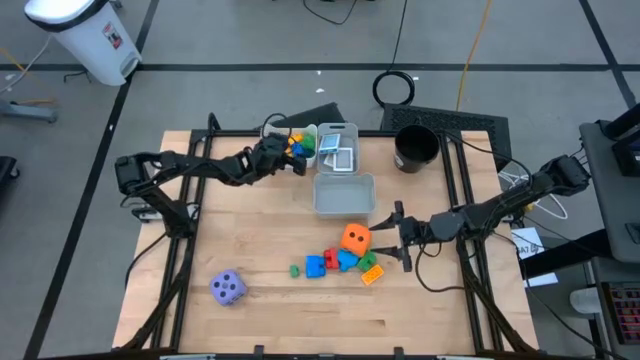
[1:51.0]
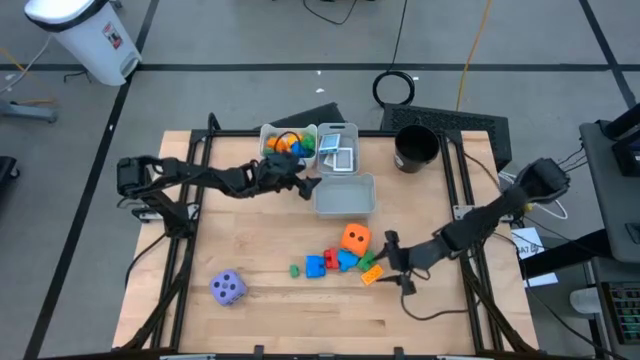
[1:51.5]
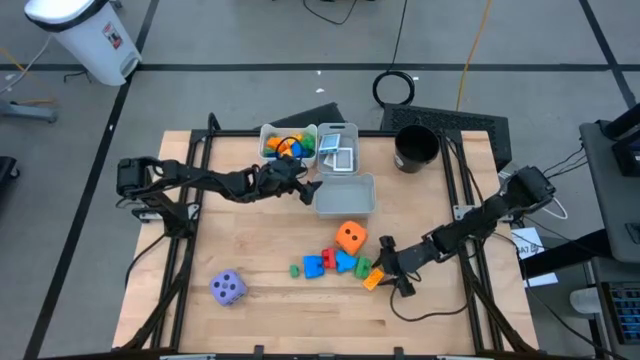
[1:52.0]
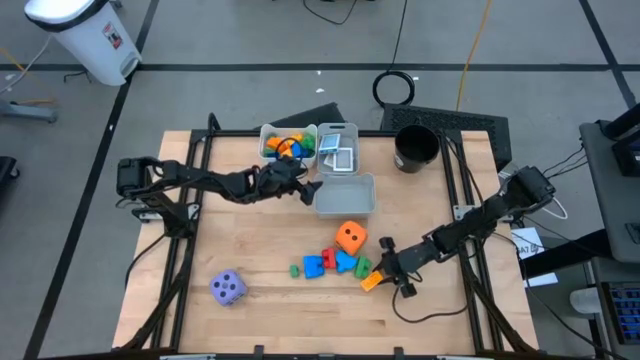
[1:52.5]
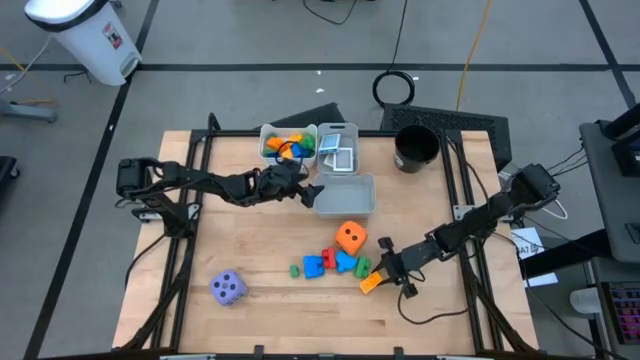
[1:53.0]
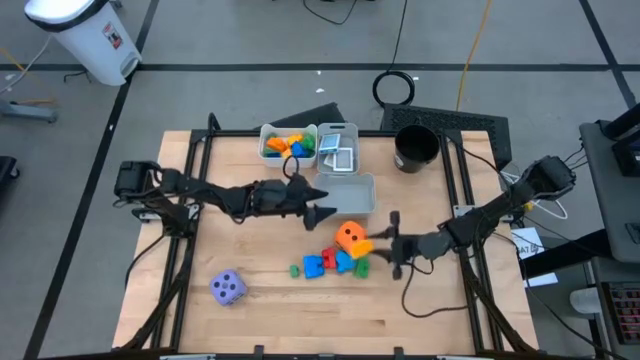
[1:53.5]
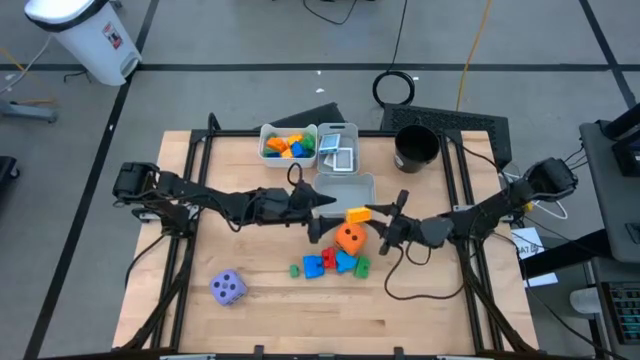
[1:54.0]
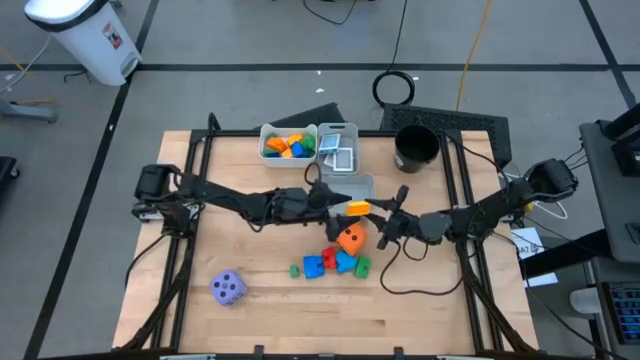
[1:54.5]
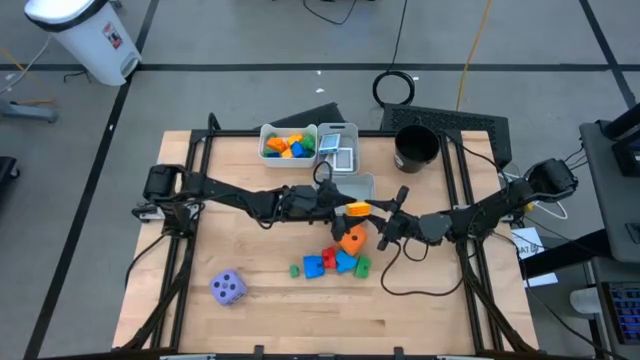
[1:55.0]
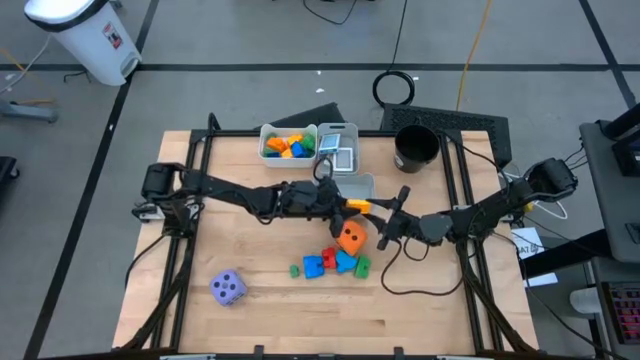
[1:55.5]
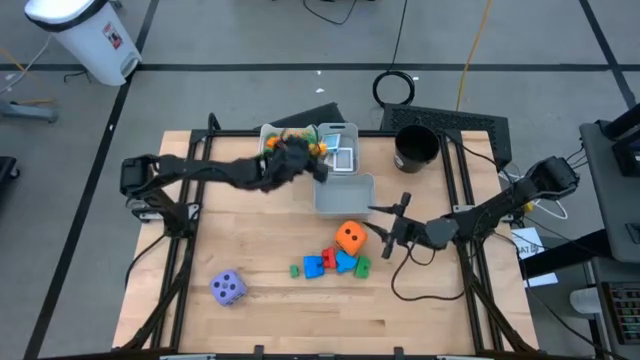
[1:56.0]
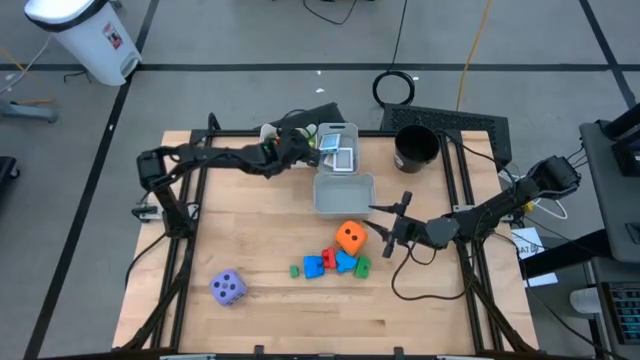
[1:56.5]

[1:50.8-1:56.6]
Task: Pick & Place Toys
Put the yellow game piece into the white bin

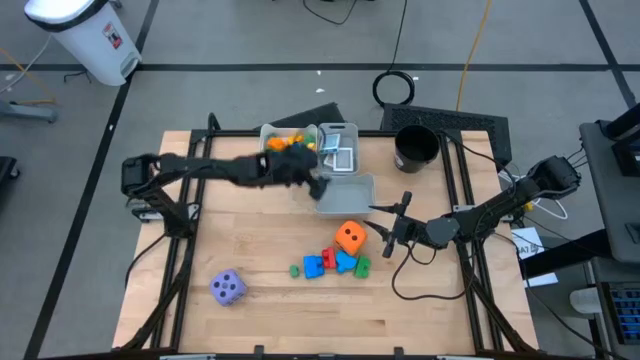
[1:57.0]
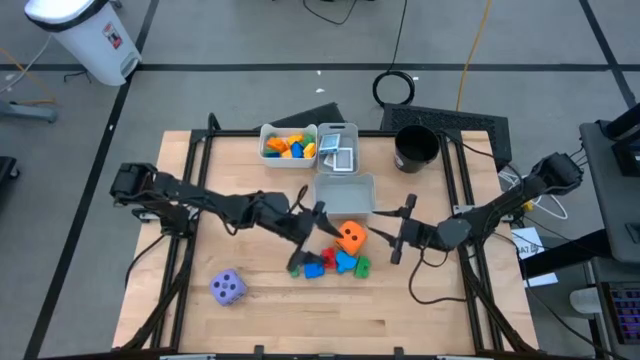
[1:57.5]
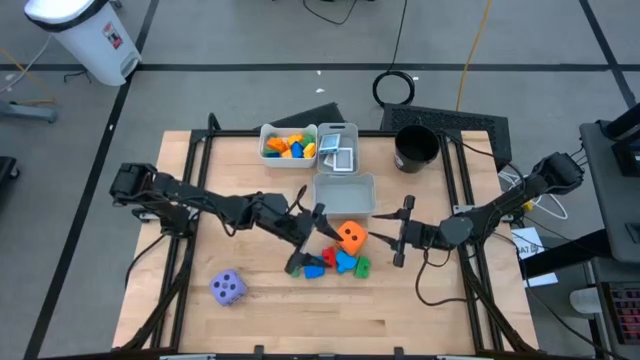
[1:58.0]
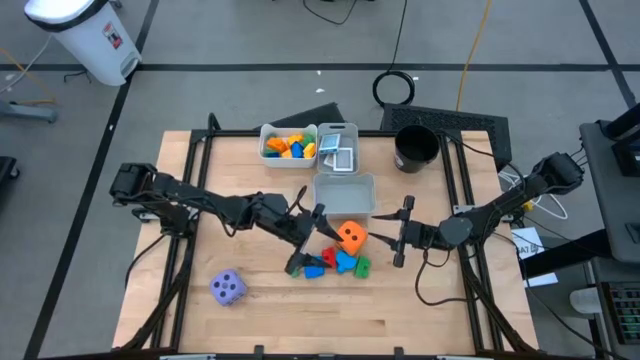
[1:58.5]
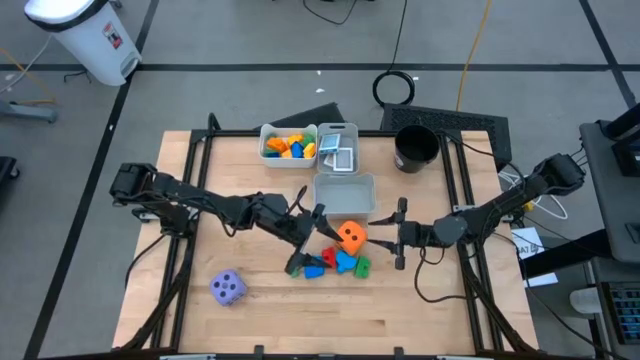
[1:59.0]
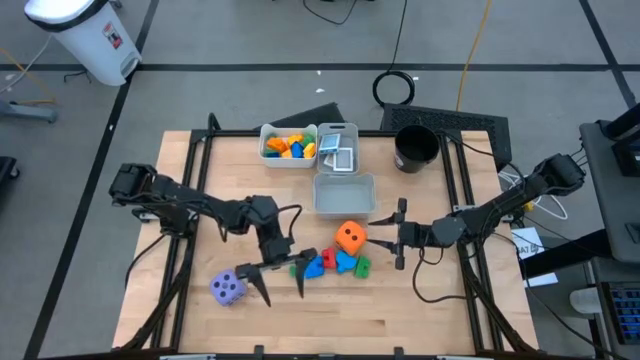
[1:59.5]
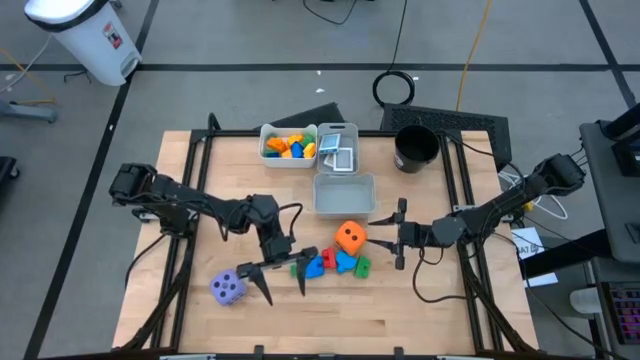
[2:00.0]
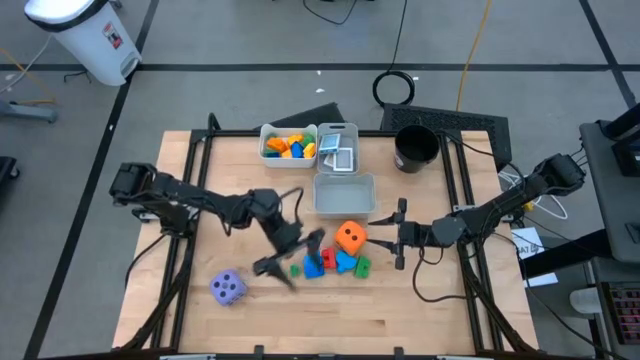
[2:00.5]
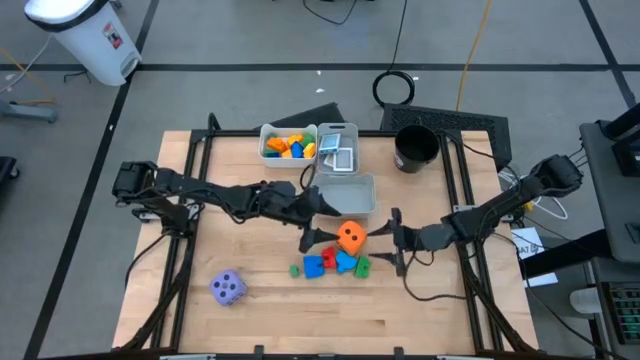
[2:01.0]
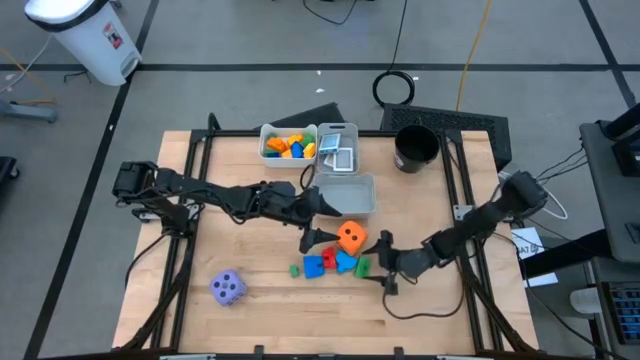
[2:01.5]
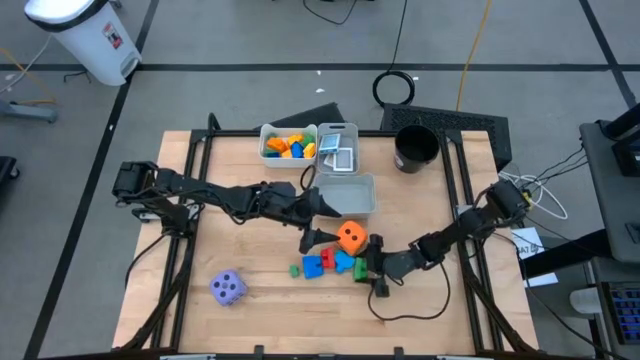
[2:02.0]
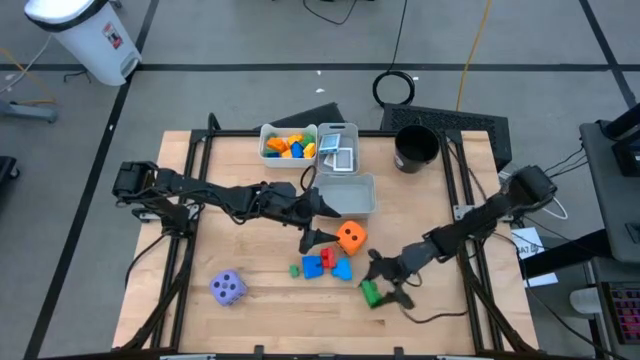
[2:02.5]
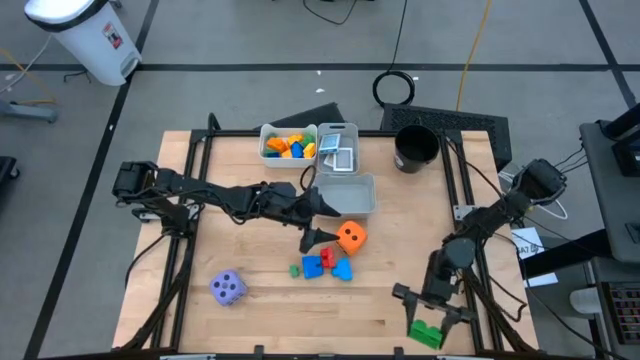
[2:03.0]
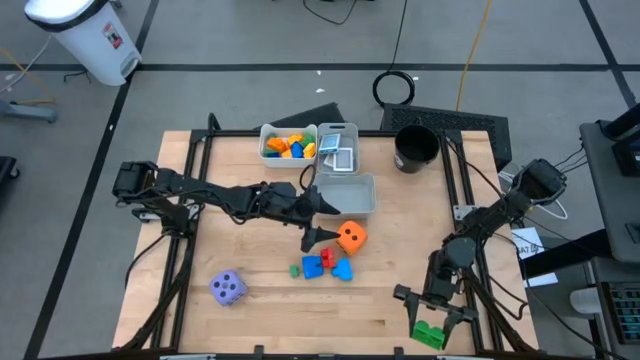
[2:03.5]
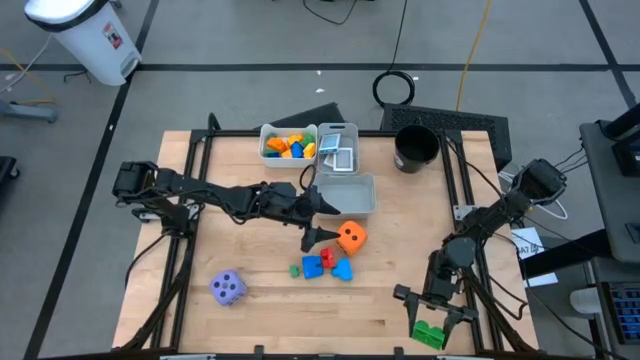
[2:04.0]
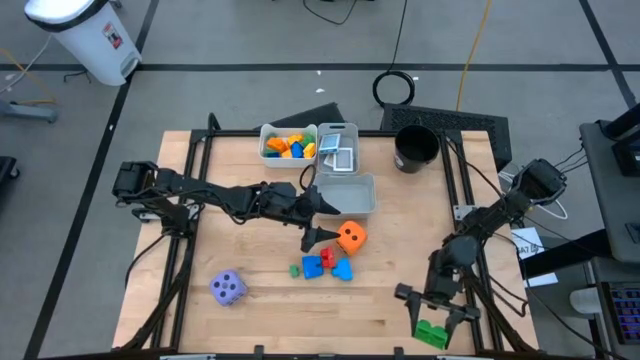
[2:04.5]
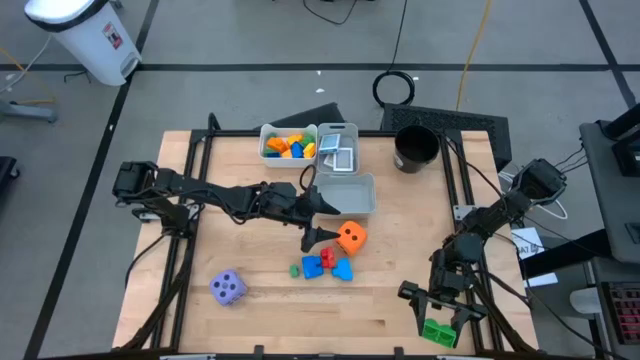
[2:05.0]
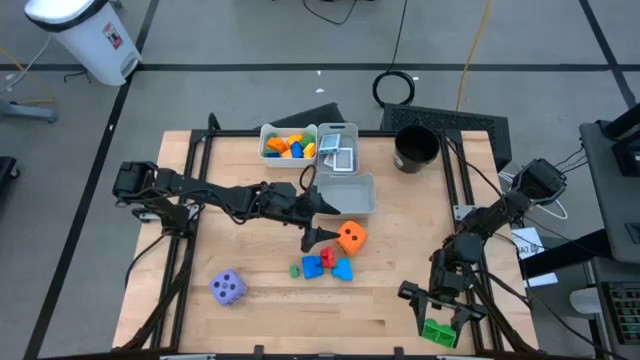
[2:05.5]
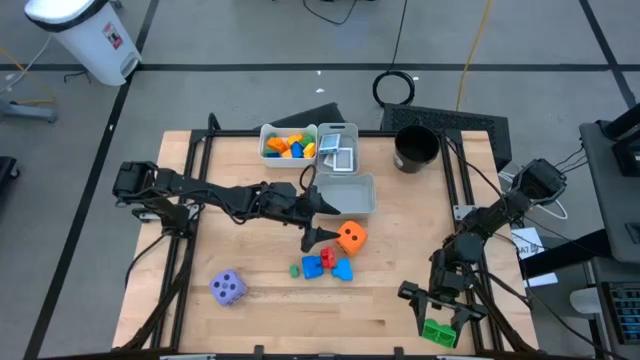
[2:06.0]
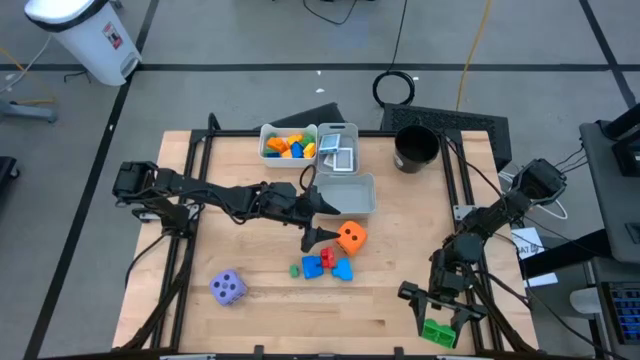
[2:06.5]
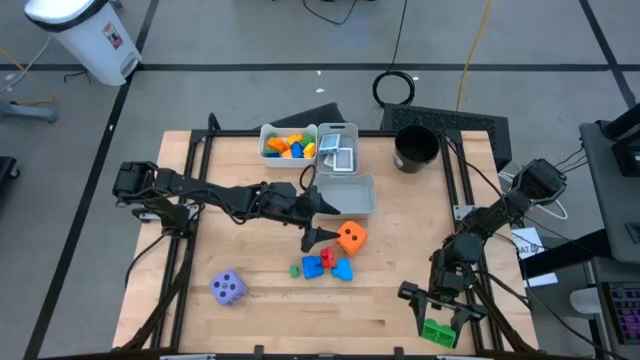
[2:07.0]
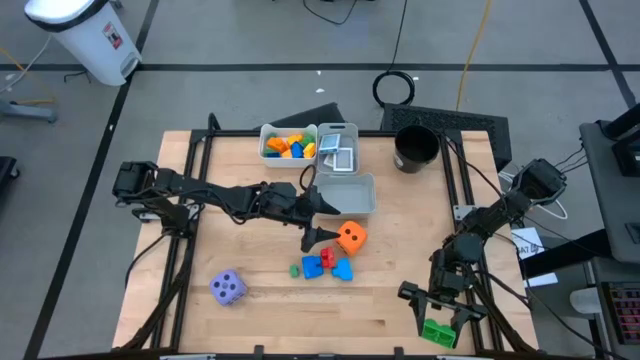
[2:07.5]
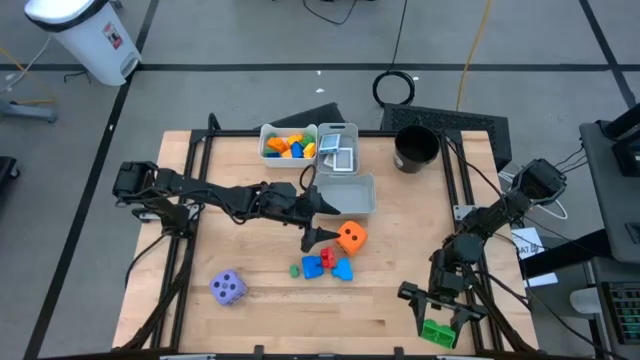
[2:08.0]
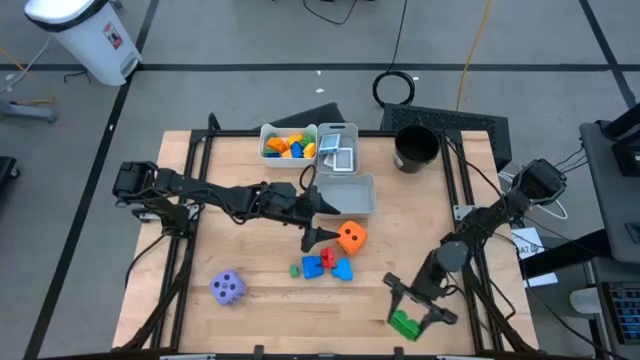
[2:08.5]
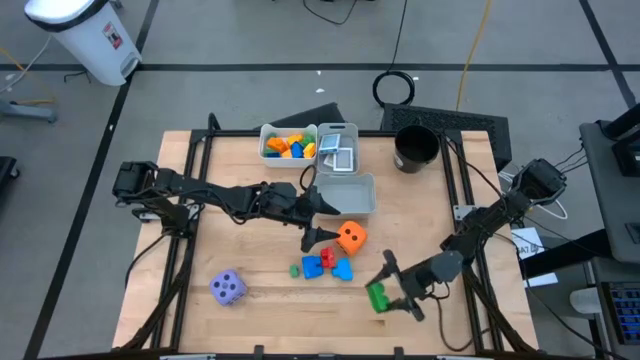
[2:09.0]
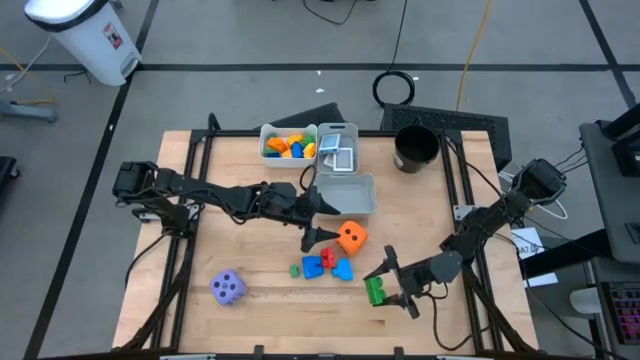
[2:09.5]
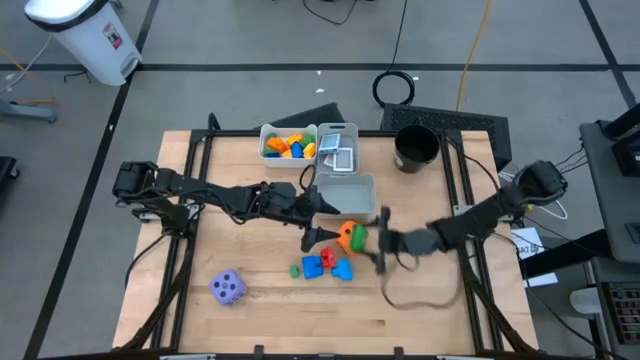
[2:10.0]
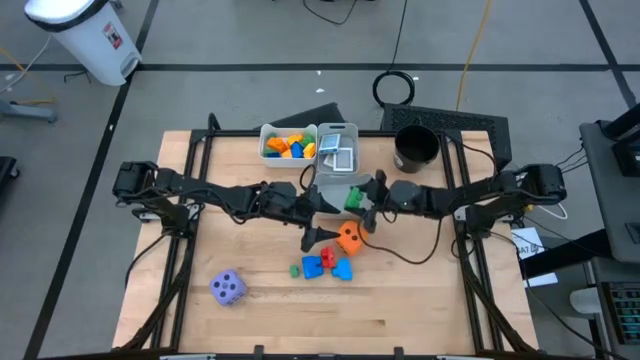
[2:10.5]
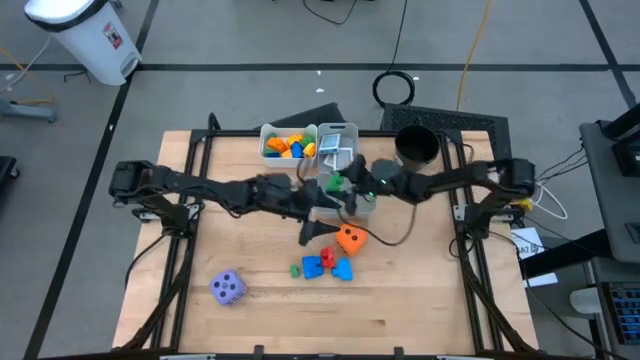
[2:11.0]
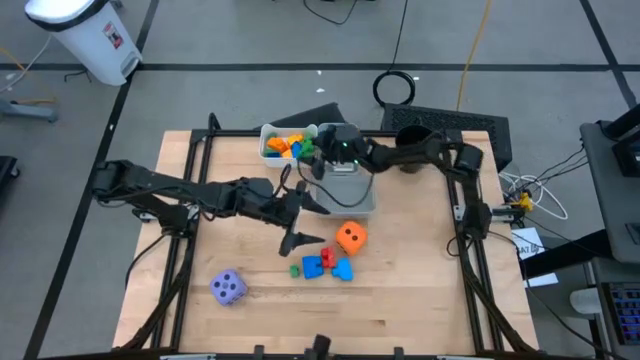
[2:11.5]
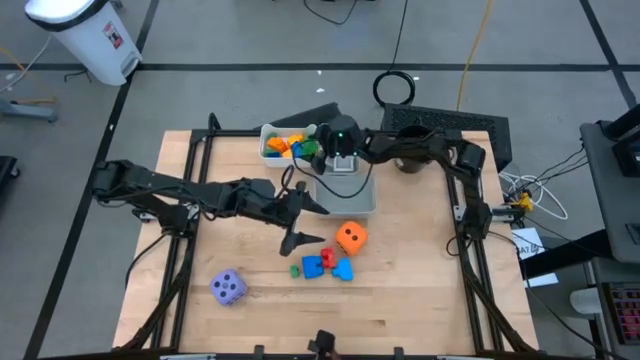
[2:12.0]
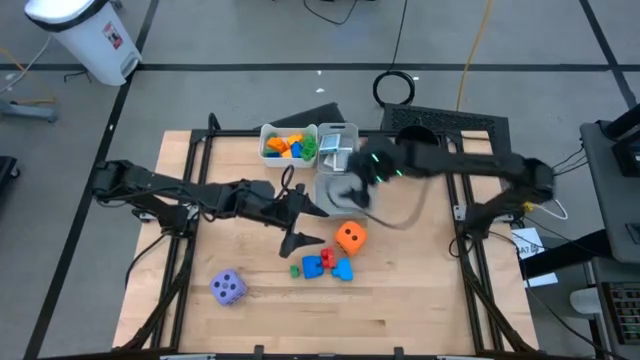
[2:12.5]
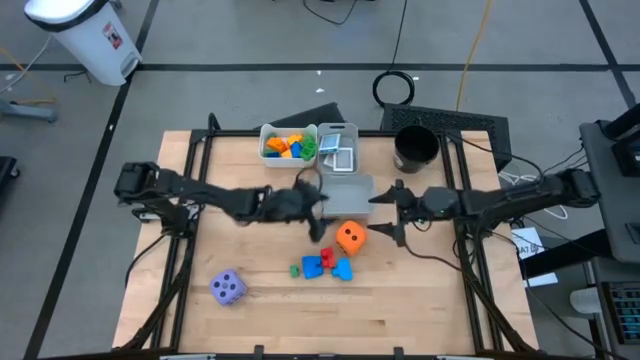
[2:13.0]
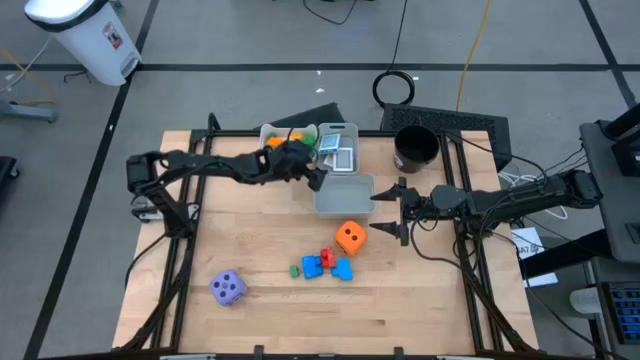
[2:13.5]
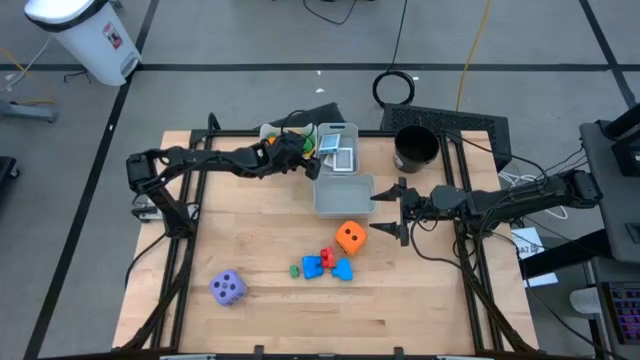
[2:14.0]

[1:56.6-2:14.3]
Put the green game piece into the white bin
